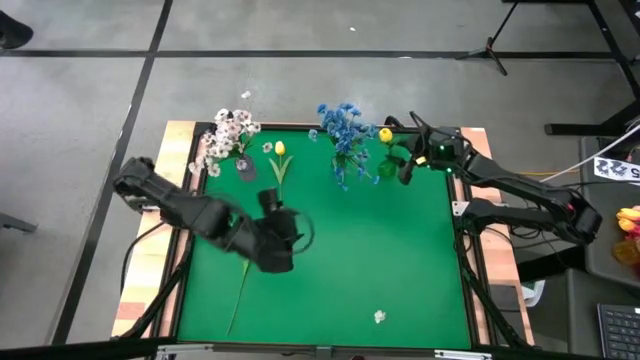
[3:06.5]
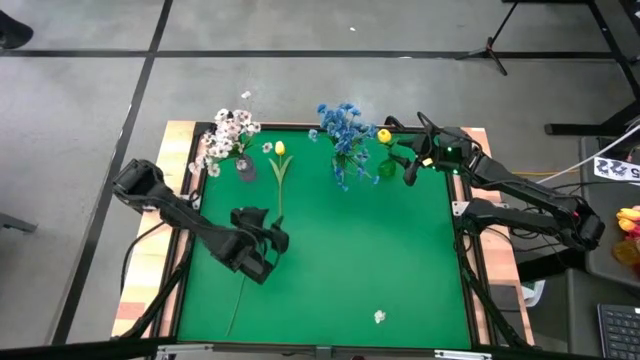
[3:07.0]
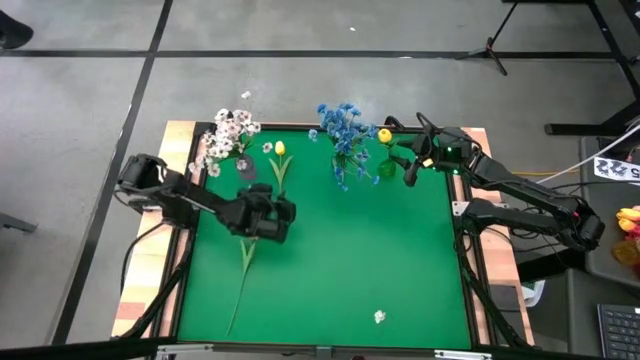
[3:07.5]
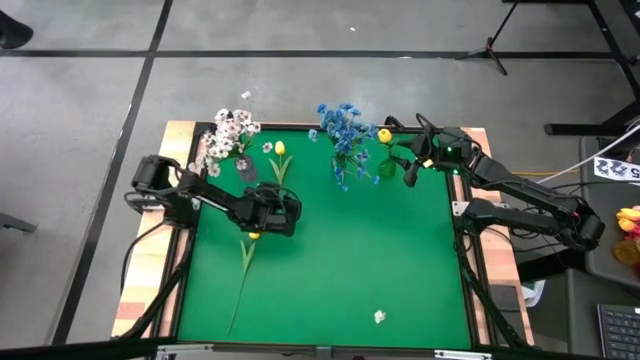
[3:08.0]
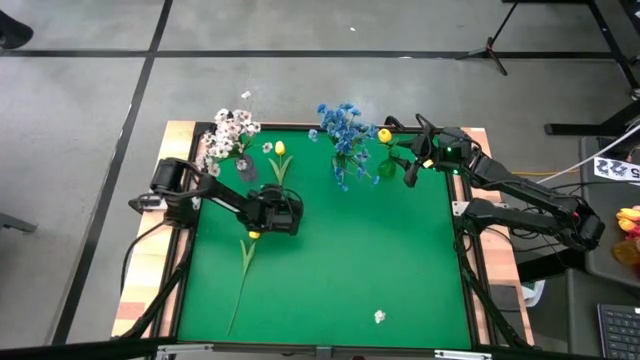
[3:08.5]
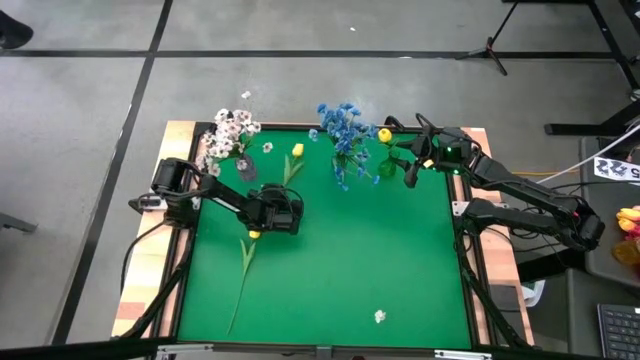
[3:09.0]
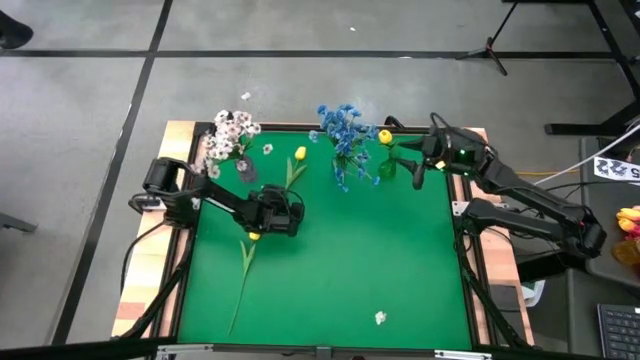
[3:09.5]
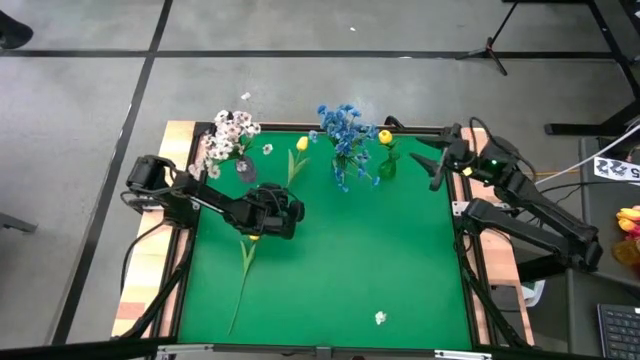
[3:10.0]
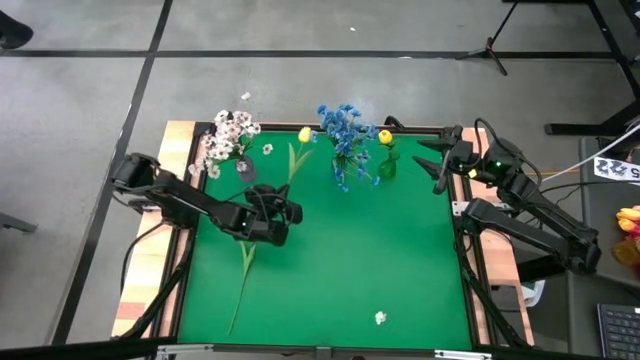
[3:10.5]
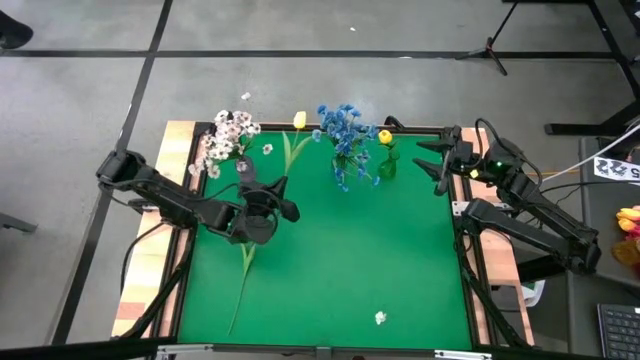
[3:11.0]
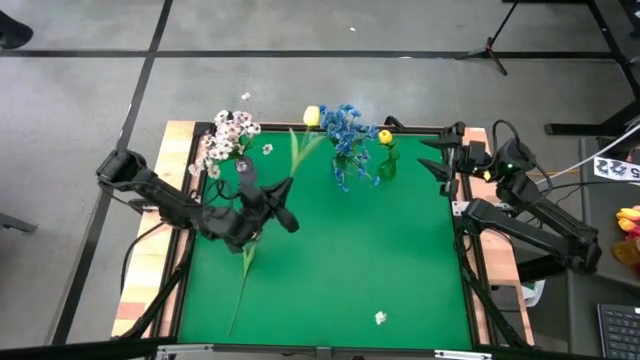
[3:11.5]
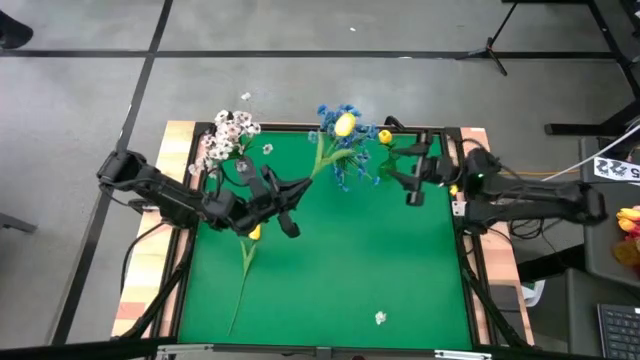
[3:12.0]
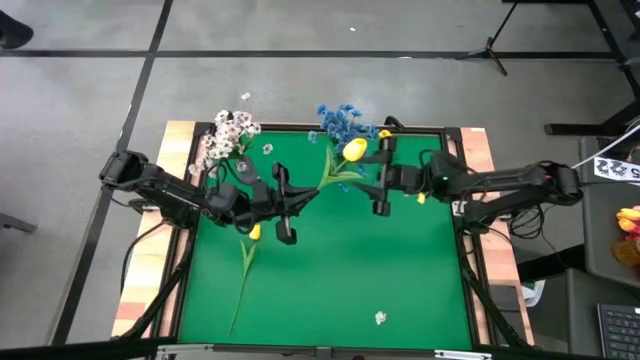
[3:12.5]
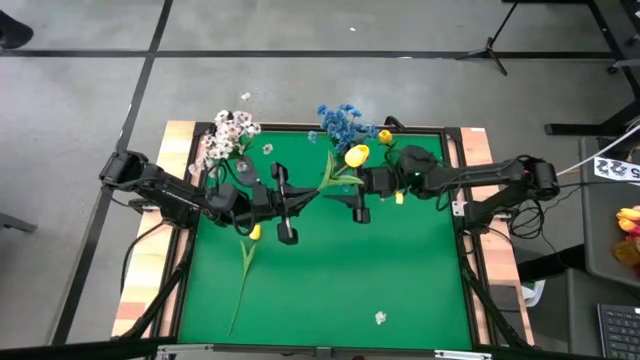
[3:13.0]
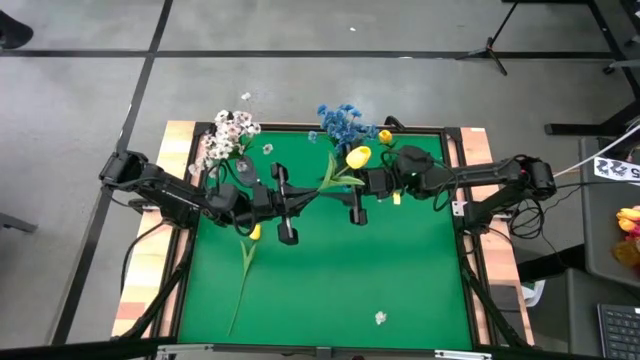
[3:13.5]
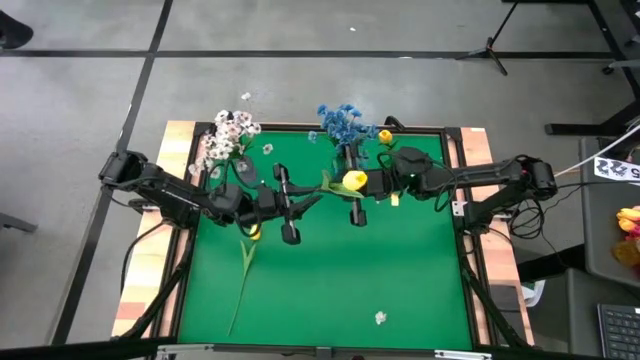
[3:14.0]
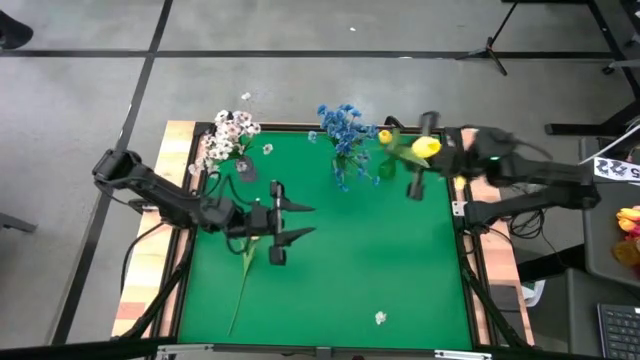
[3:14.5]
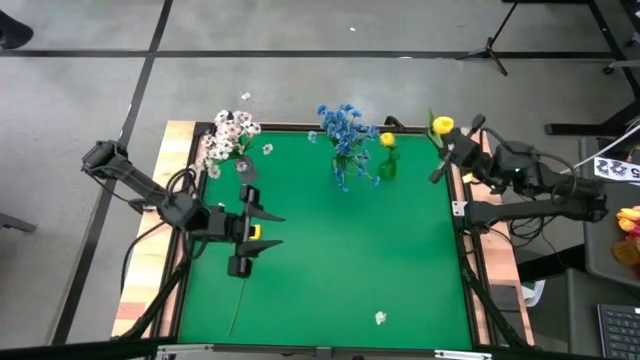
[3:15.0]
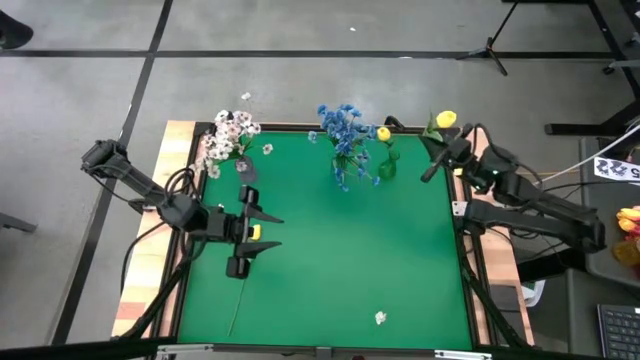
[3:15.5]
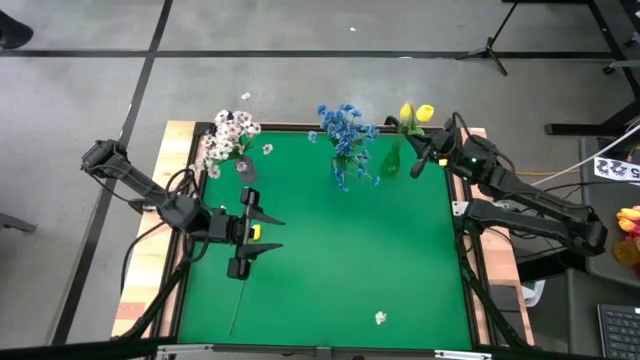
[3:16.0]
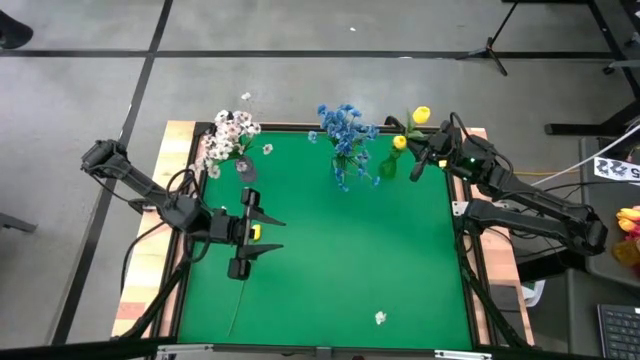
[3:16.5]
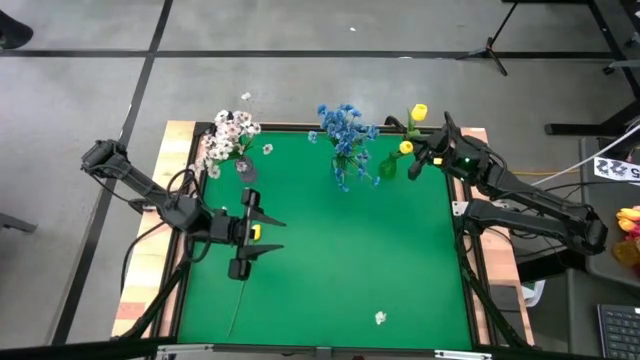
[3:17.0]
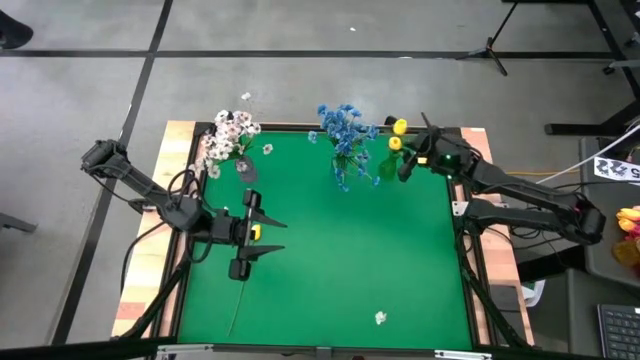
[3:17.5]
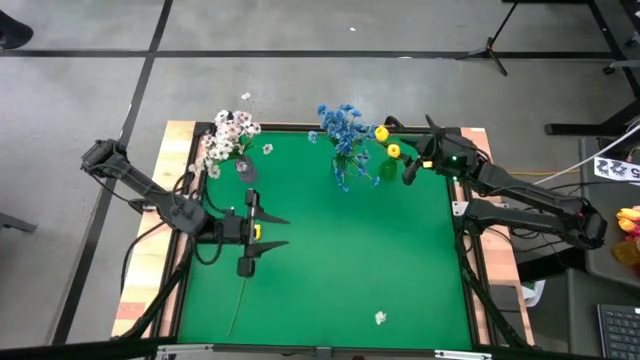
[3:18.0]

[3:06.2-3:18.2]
Task: Sort flowers into vase by color
Put the top yellow flower into the green vase

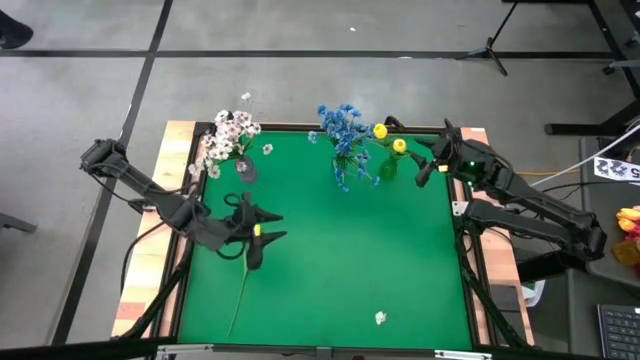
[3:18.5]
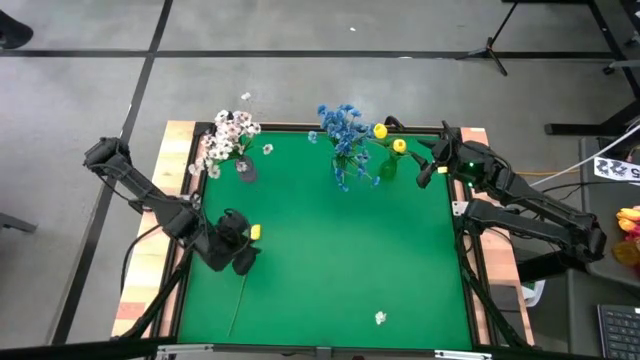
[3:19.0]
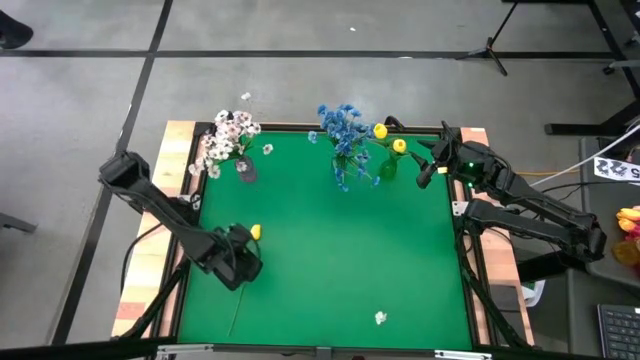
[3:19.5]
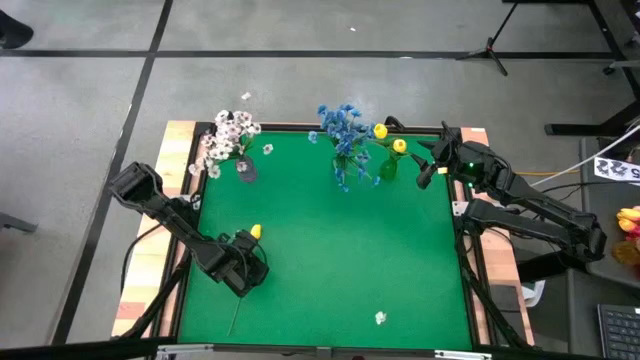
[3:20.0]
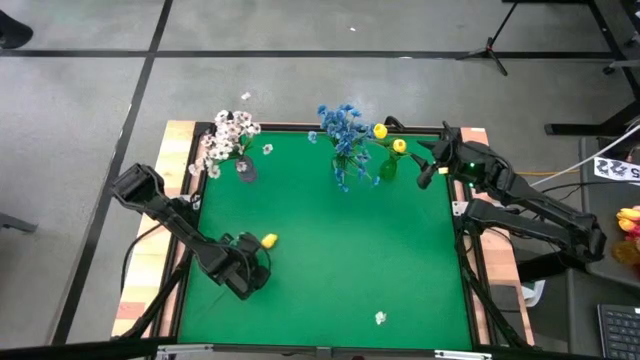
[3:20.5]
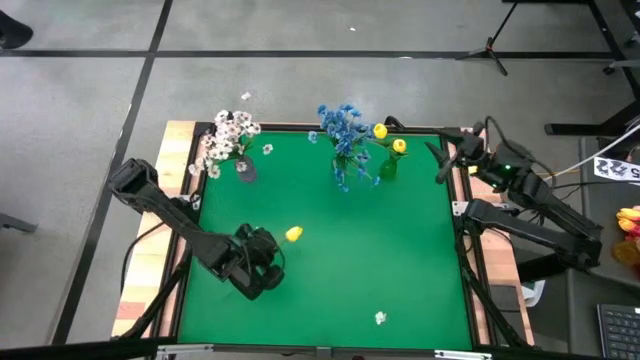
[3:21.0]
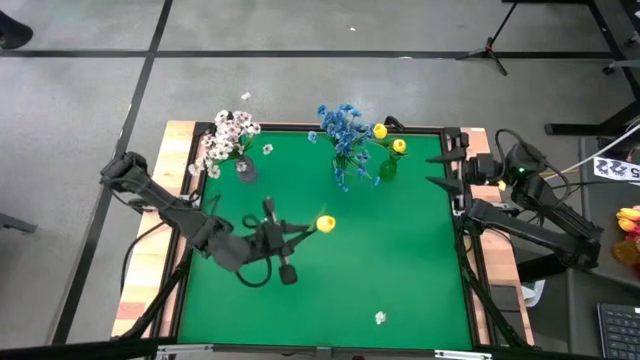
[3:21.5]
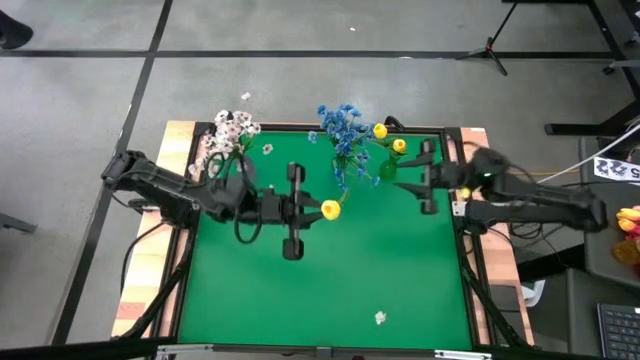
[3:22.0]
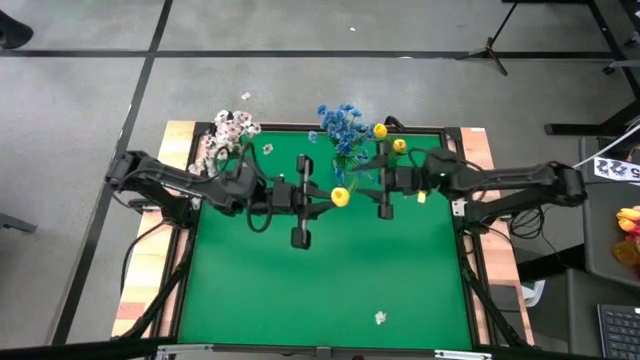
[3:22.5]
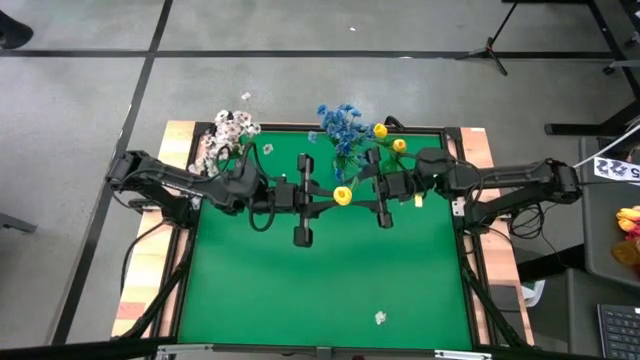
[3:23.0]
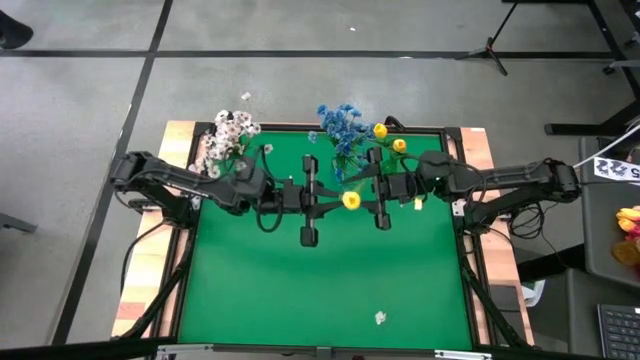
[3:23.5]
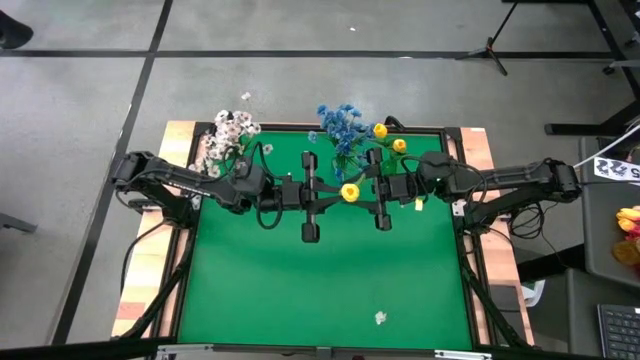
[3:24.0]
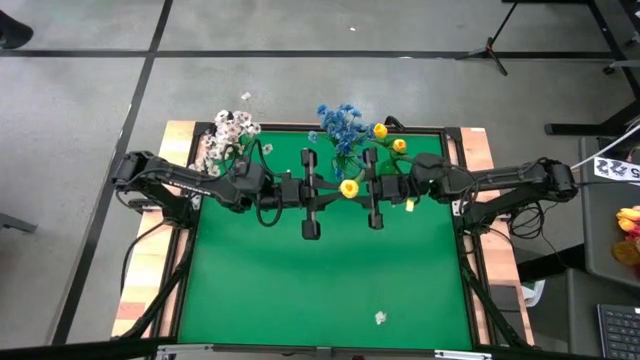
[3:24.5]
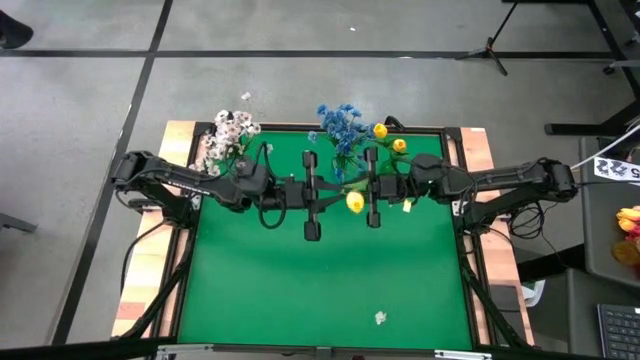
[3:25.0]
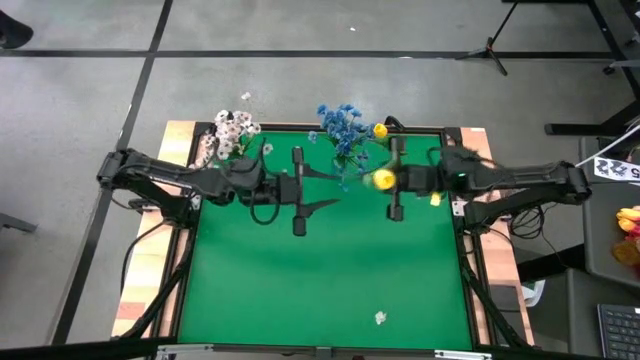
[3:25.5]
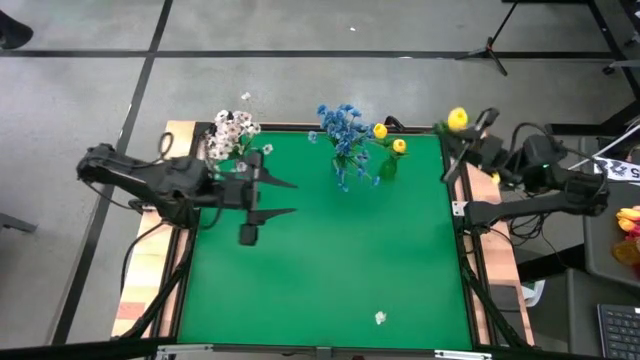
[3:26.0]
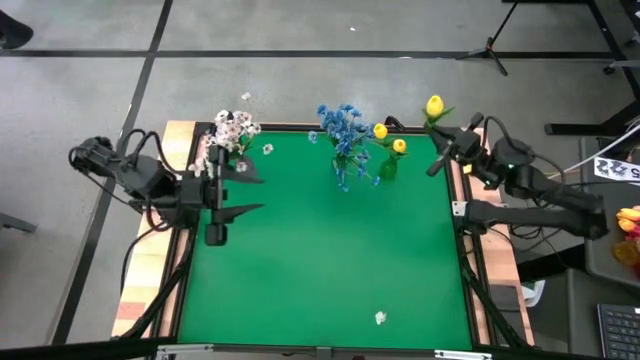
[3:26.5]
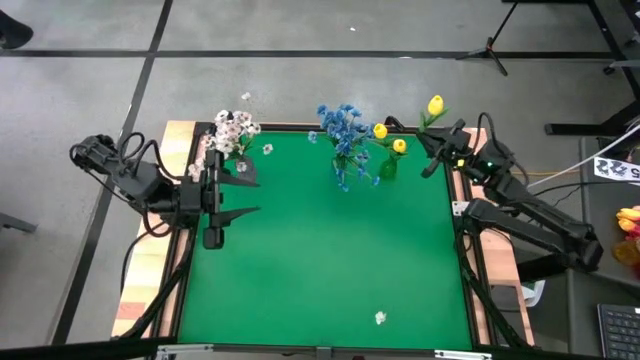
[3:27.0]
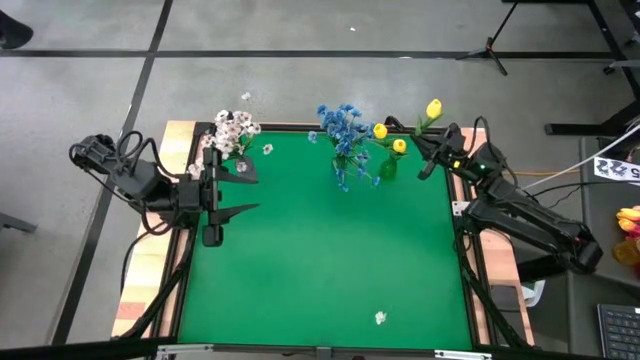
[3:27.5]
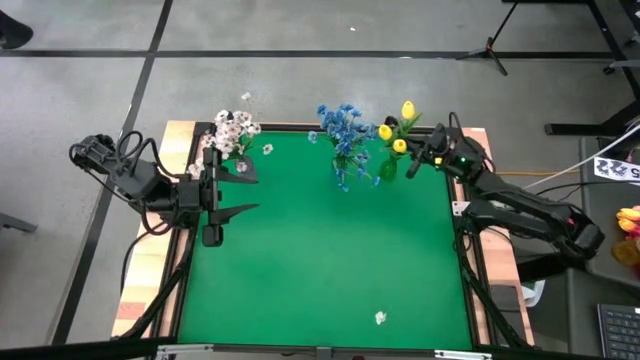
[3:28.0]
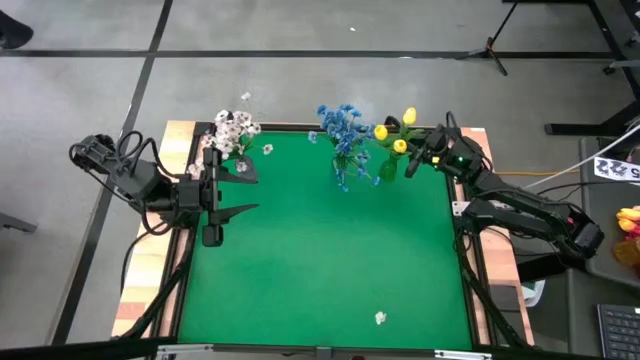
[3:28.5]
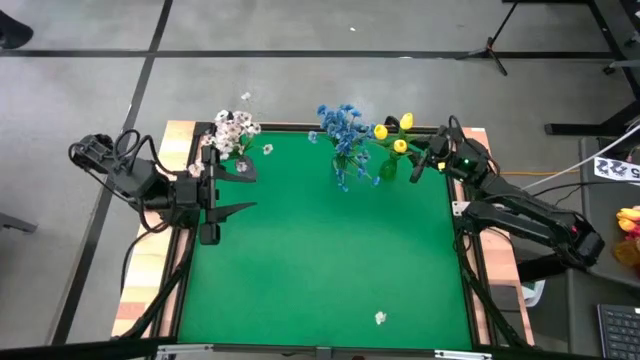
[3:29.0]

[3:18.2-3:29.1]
Put the yellow flower into the green vase

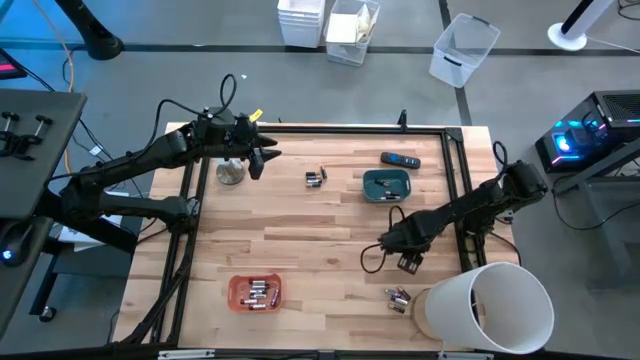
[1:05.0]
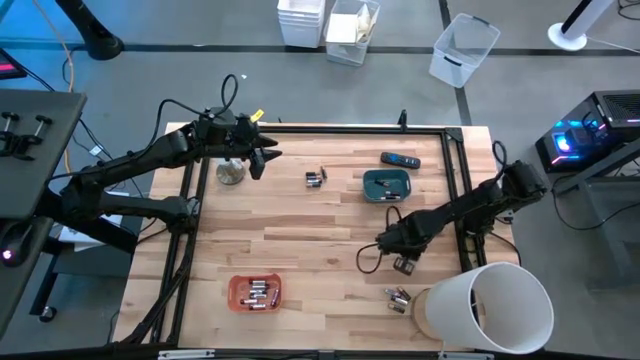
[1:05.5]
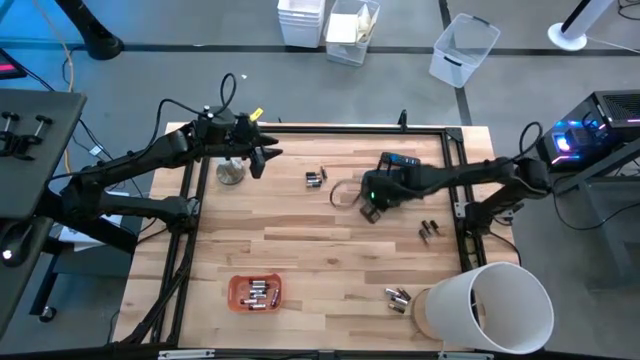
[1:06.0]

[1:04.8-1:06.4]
Task: Sort batteries
Put the black battery into the blue bin
